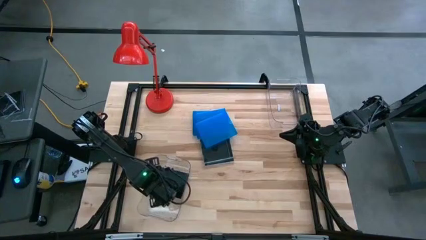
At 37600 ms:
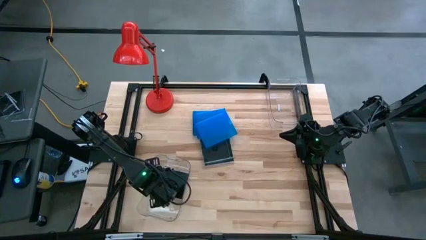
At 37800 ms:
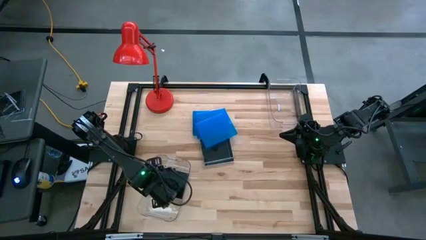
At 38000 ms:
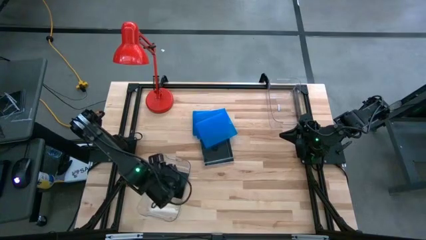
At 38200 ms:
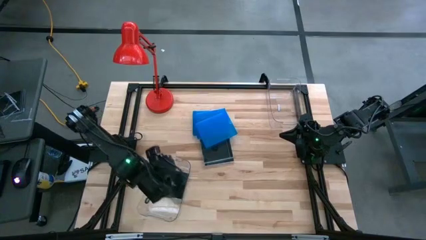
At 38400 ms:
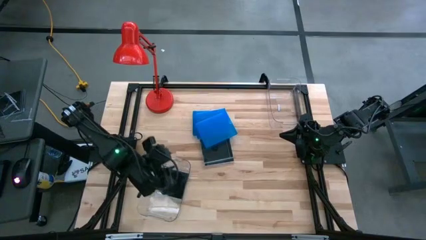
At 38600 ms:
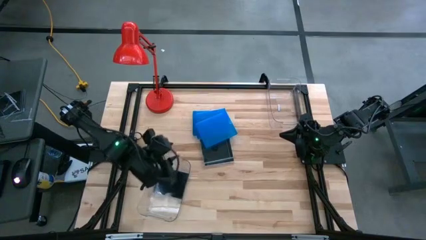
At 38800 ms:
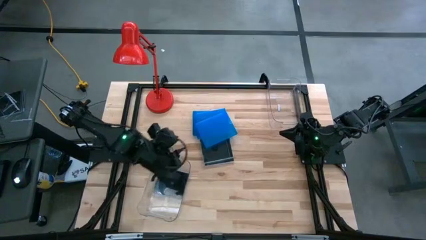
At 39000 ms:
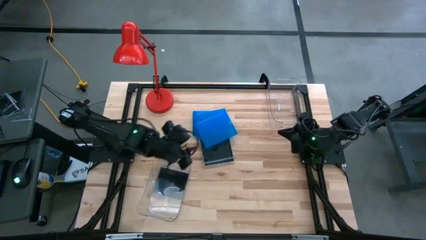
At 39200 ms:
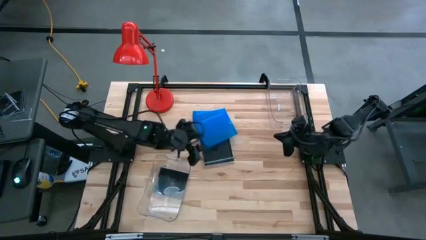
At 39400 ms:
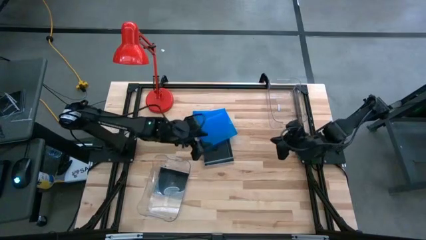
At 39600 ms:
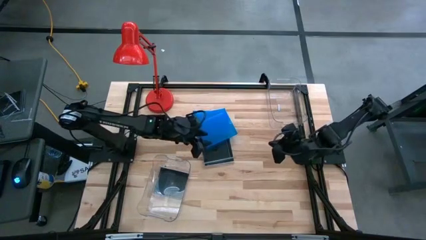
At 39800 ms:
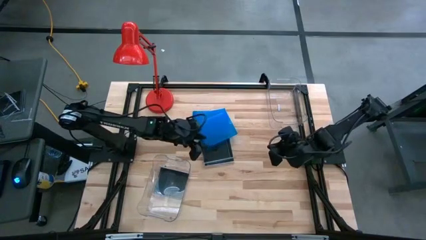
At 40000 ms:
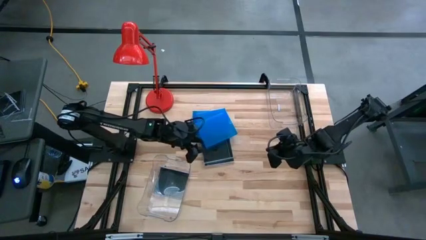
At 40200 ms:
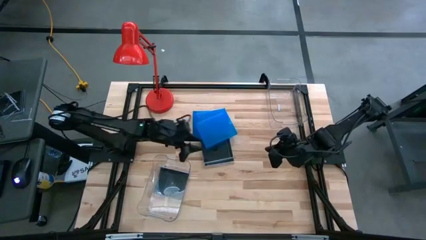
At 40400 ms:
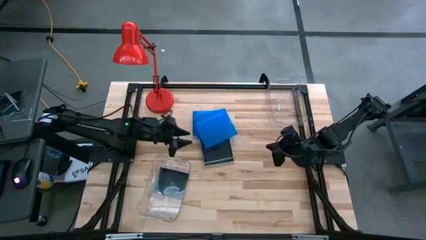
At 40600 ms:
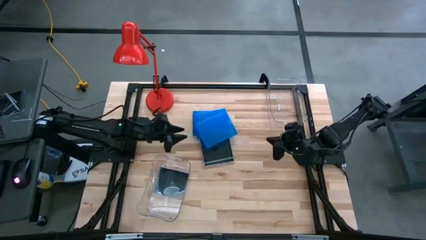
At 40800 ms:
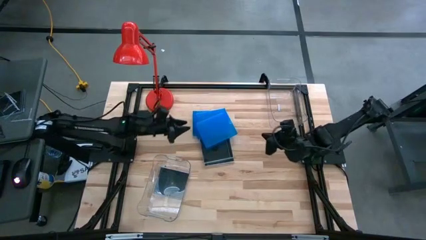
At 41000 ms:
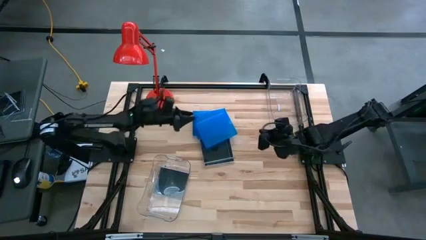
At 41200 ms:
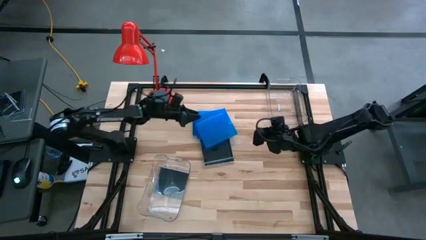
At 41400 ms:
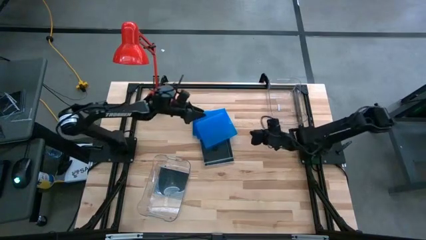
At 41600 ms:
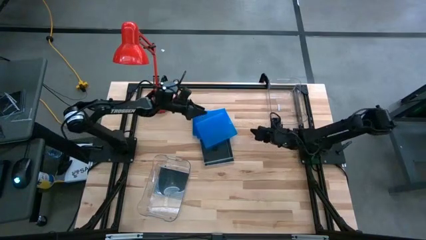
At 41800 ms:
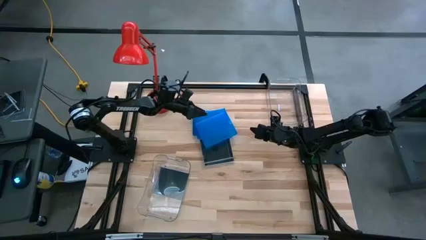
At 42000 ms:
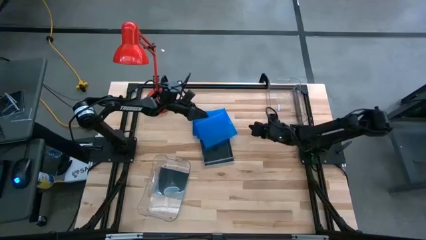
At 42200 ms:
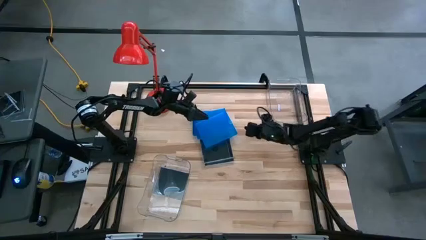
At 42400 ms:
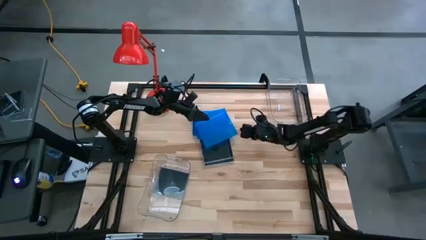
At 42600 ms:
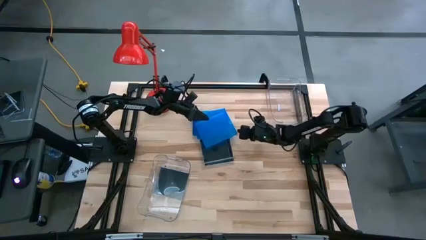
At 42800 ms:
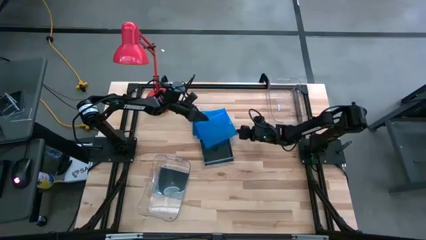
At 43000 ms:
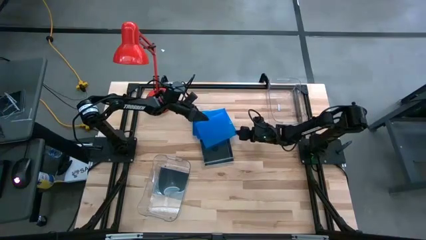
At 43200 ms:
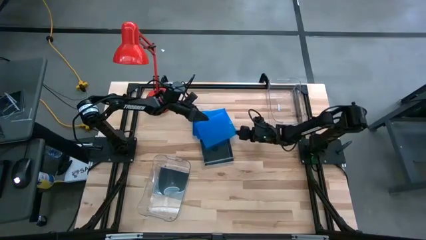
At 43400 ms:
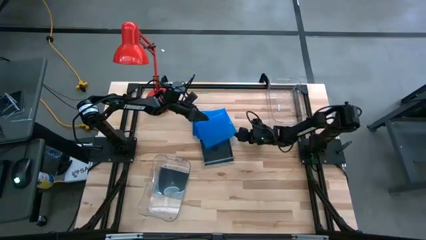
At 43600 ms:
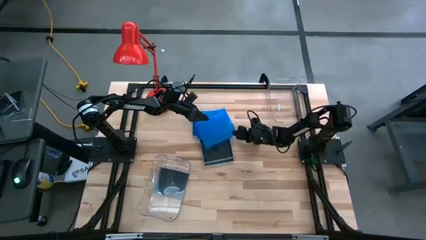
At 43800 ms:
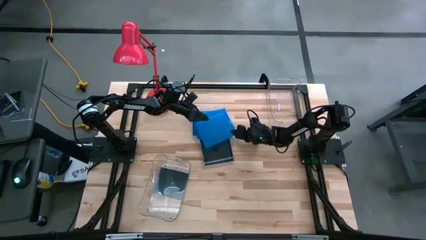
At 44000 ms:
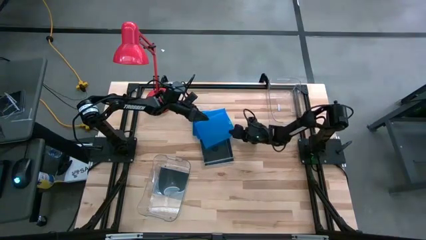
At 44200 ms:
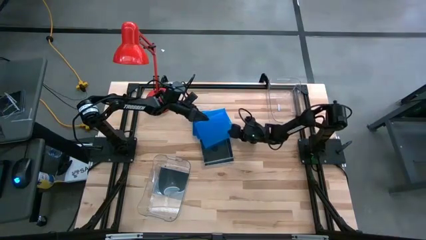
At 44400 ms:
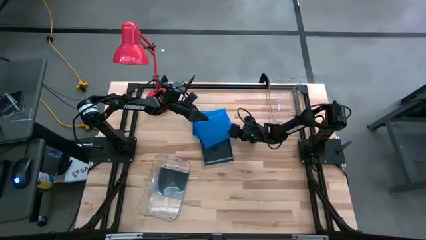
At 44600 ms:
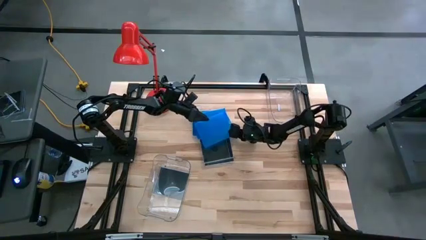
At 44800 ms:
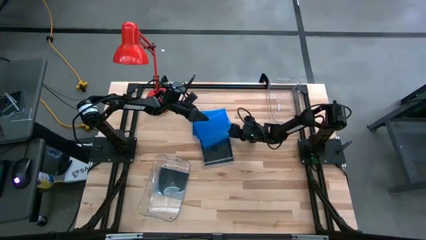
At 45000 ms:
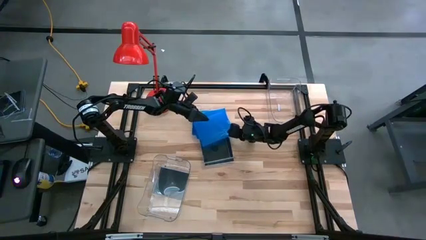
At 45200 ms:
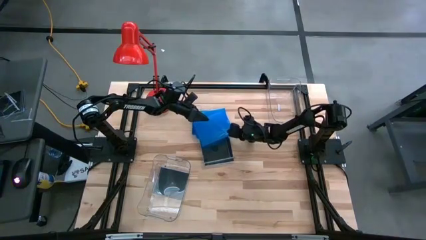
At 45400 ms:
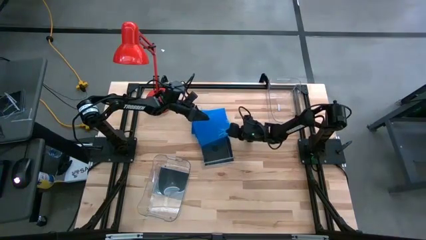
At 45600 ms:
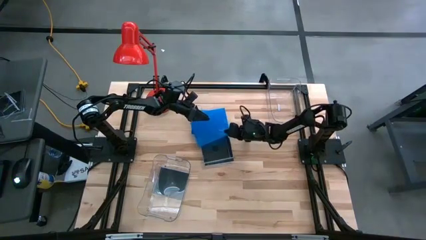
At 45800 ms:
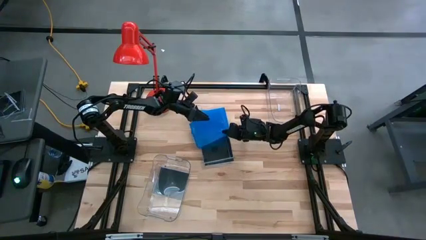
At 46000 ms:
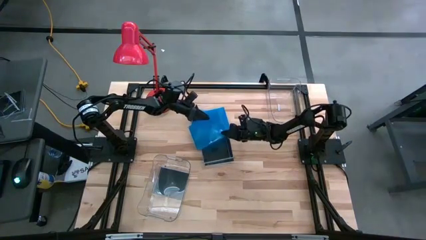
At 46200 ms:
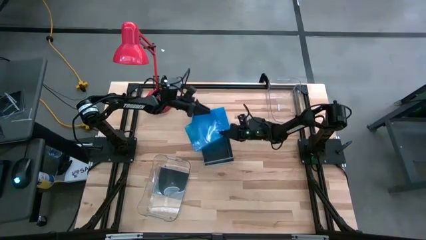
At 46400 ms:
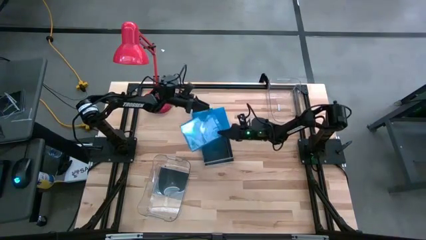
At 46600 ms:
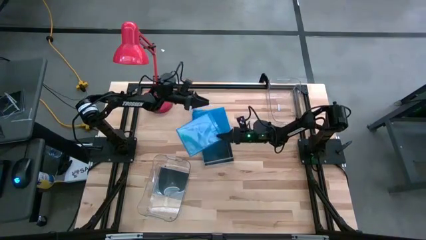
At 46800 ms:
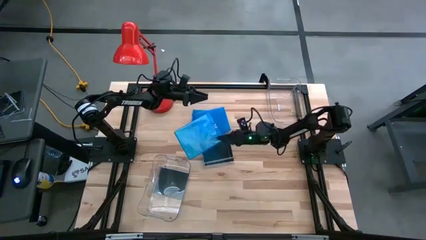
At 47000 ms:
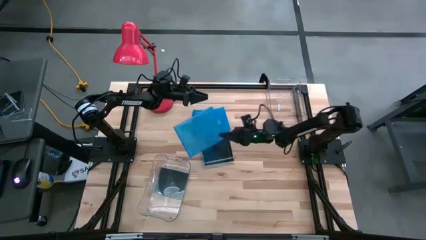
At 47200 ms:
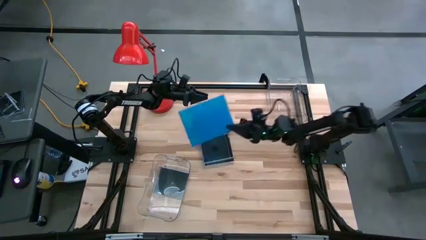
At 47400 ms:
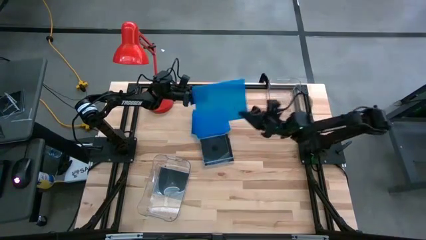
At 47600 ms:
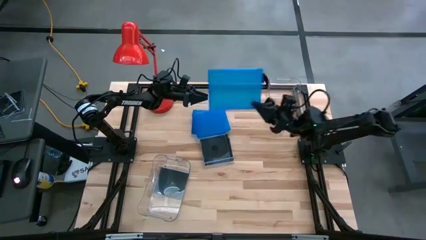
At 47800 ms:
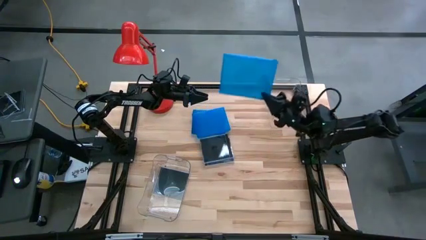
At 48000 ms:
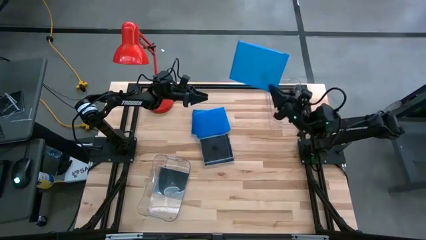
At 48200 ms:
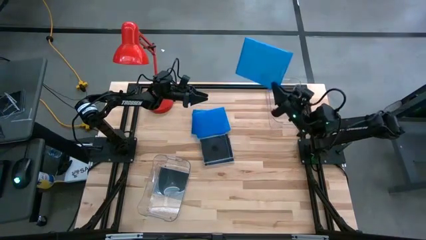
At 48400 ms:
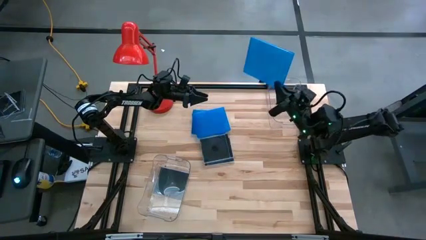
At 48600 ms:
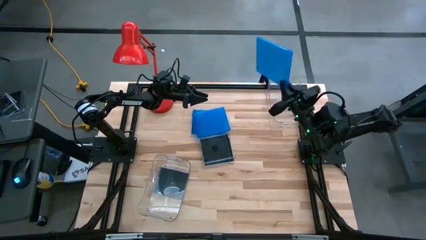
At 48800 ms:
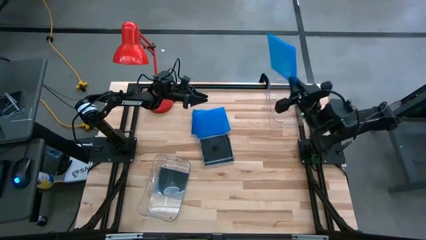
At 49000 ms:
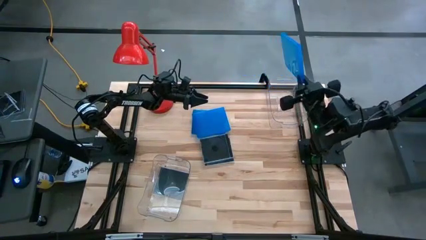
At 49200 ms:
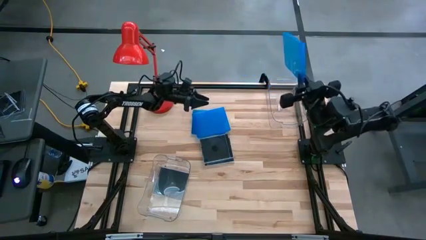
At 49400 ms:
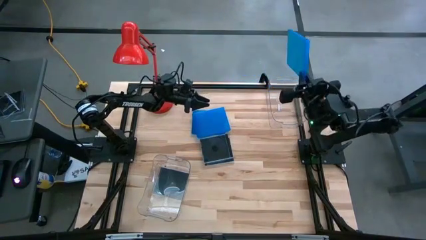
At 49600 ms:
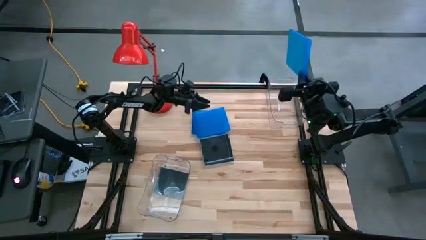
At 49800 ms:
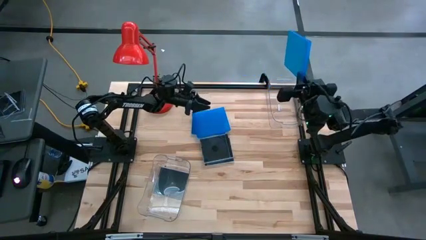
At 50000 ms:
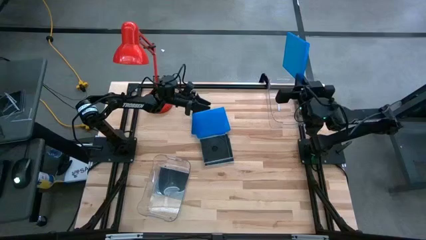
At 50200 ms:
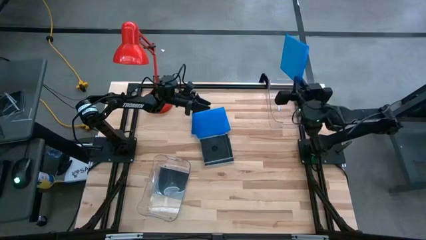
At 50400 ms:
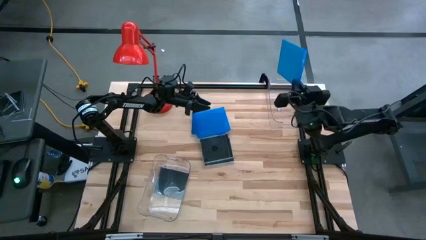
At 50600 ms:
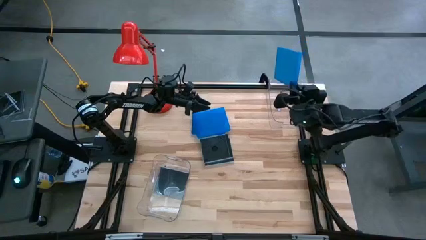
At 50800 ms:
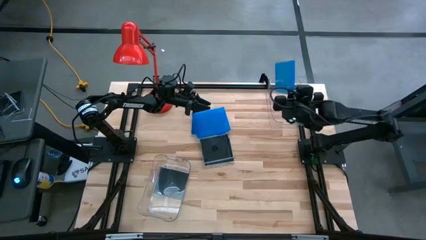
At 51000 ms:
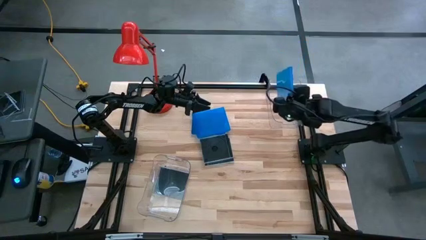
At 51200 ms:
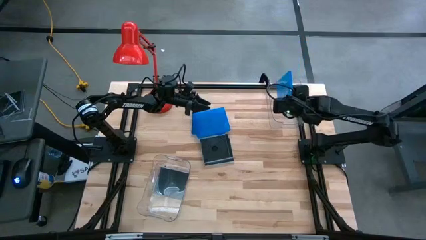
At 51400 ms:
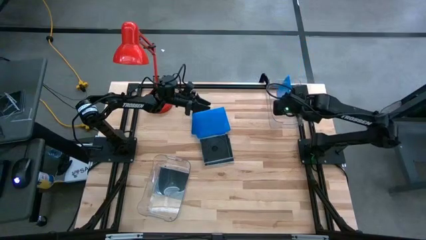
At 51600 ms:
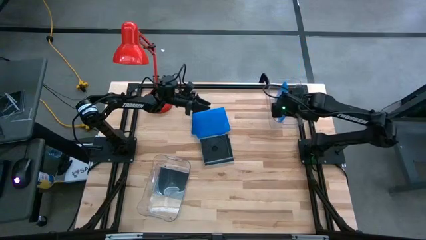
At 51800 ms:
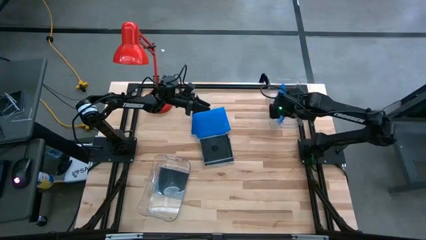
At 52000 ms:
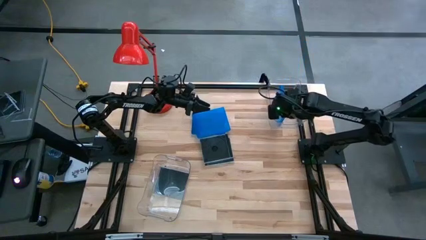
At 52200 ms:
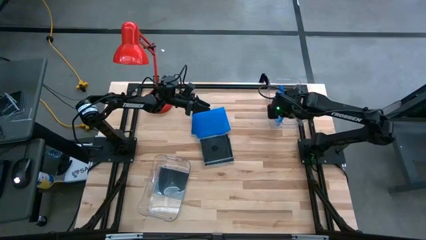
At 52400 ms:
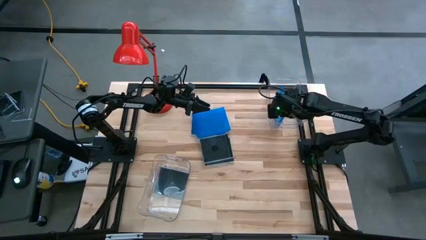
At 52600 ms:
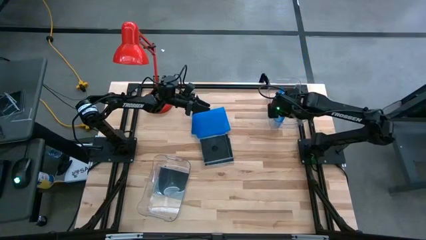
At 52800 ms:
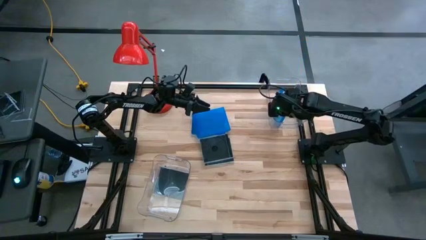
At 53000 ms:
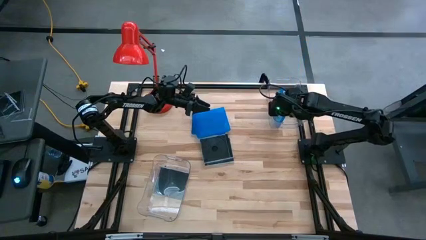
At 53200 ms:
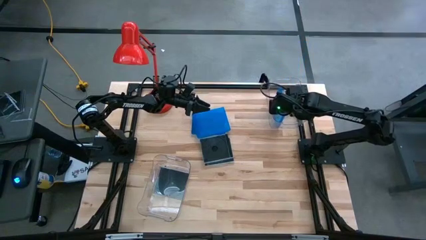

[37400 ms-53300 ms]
Task: Pick & place jewel cases by type
Put the blue cd case into the top transparent bin
